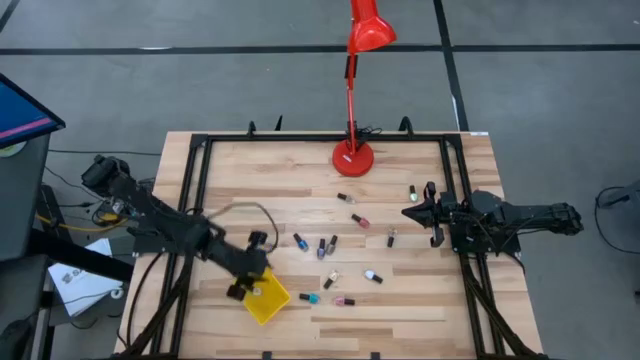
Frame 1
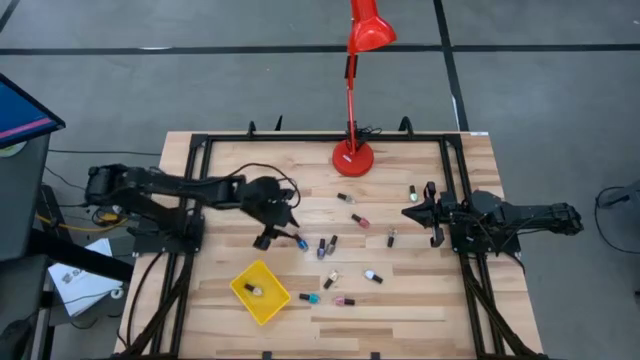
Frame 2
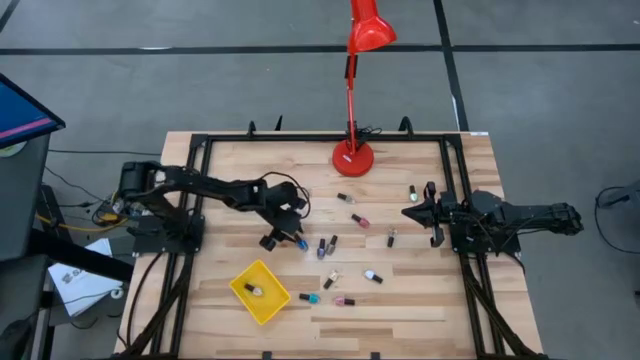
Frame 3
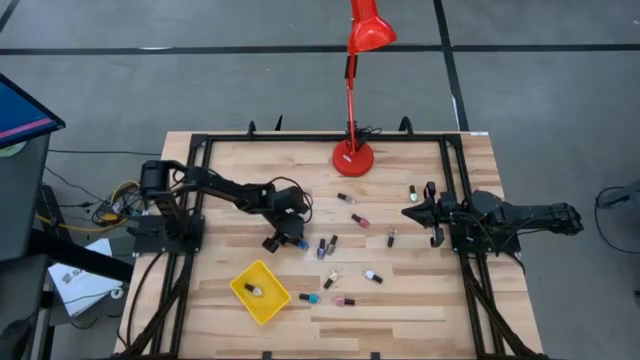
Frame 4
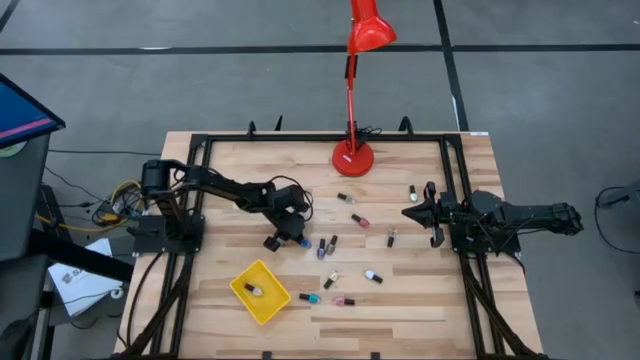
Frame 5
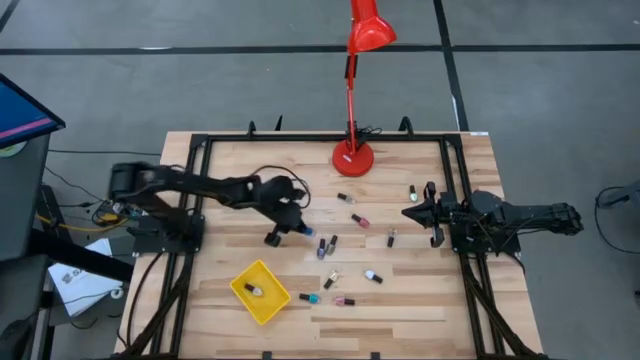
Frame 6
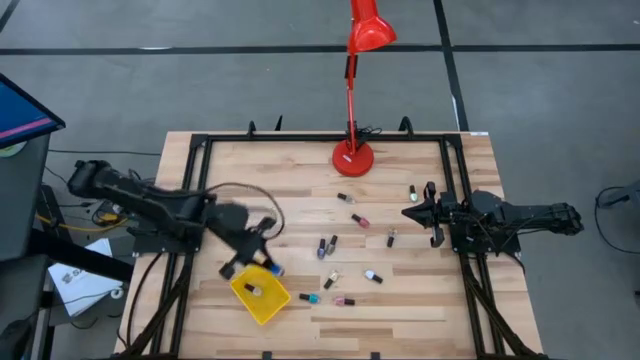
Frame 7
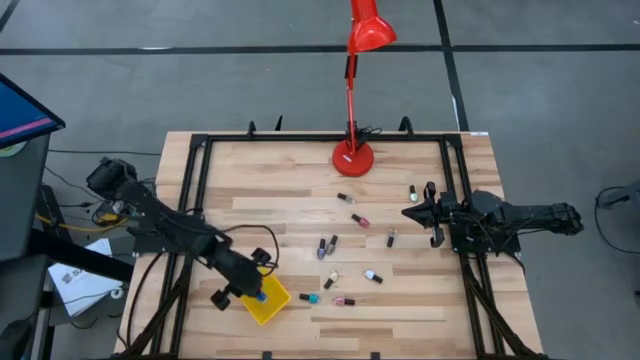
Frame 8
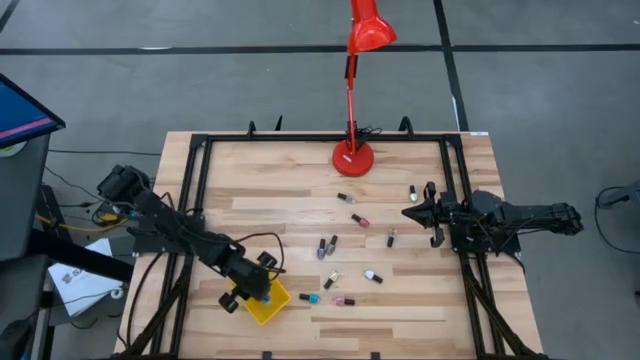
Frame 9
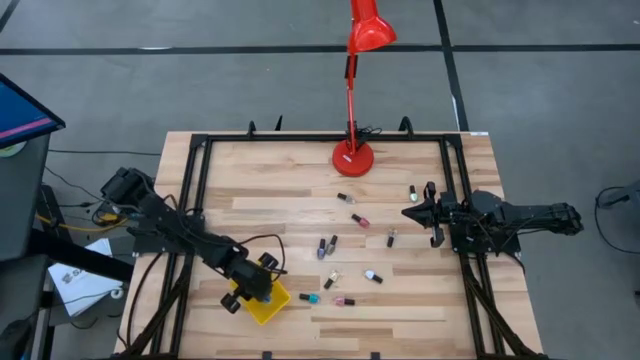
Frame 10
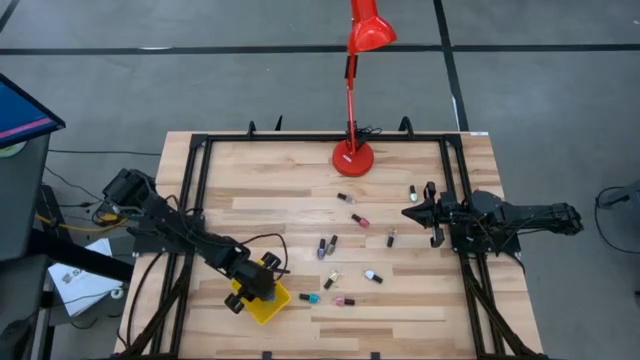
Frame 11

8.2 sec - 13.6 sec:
Task: Pick & Place Nail Polish
Put the blue nail polish bottle into the yellow basket

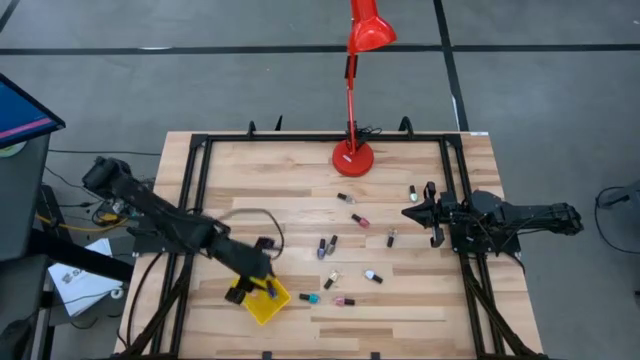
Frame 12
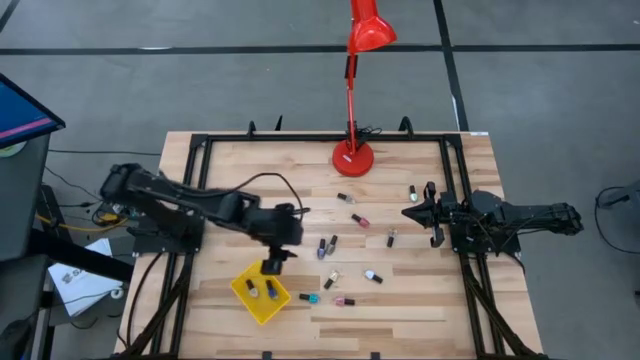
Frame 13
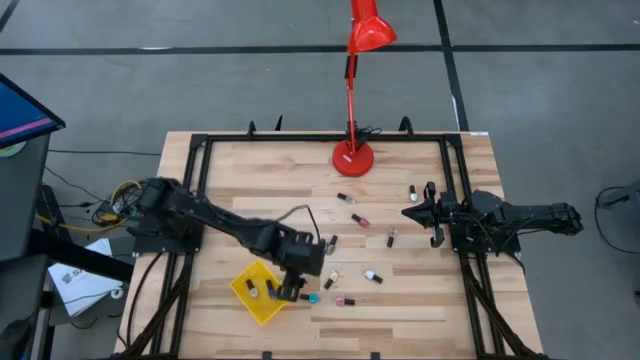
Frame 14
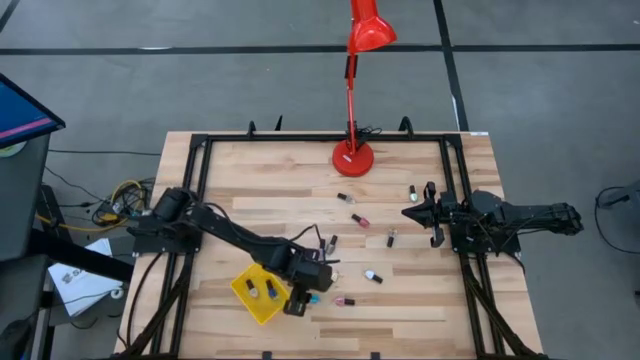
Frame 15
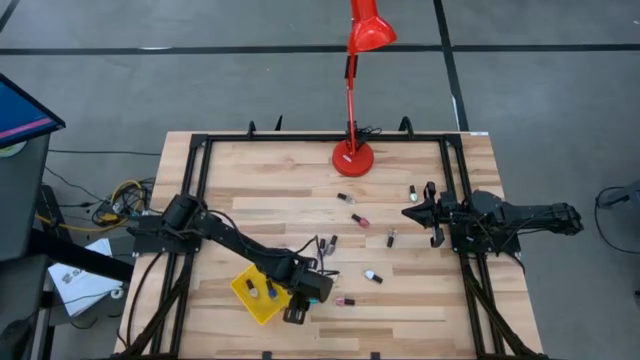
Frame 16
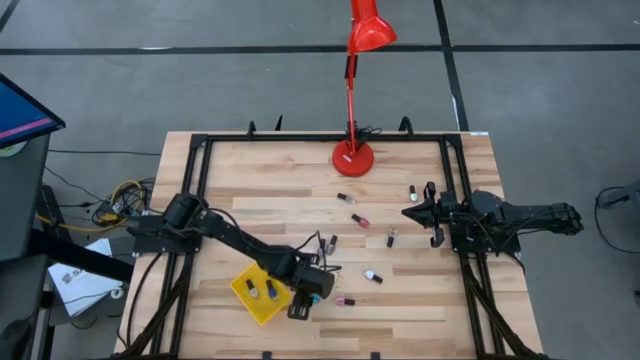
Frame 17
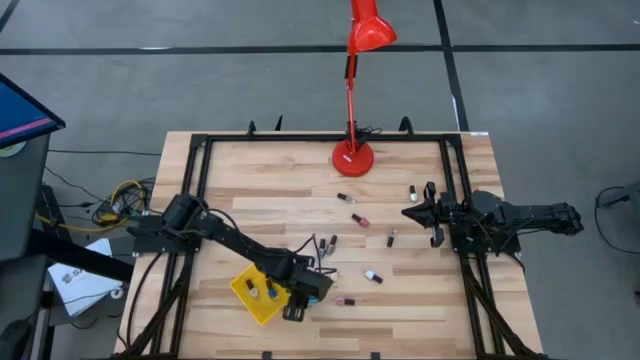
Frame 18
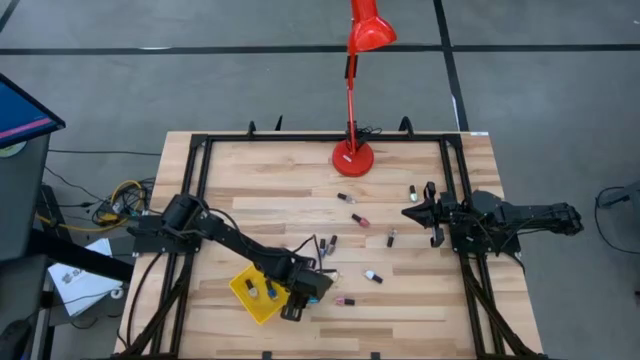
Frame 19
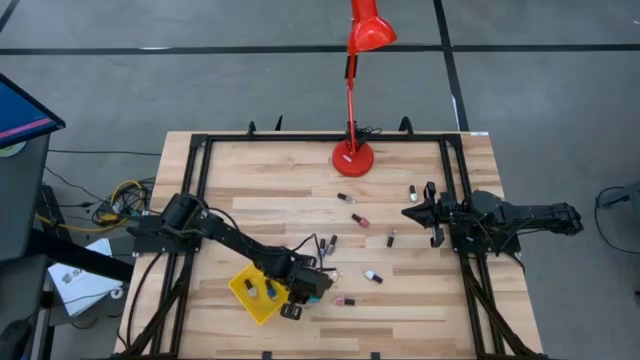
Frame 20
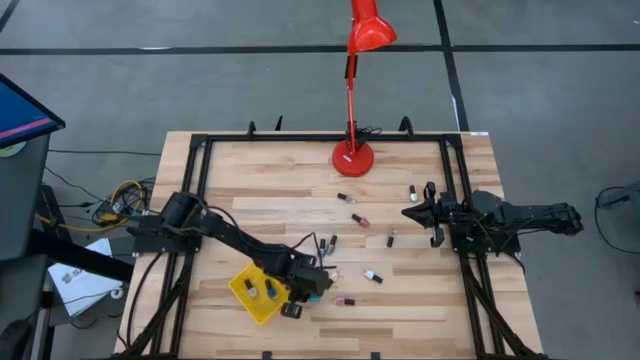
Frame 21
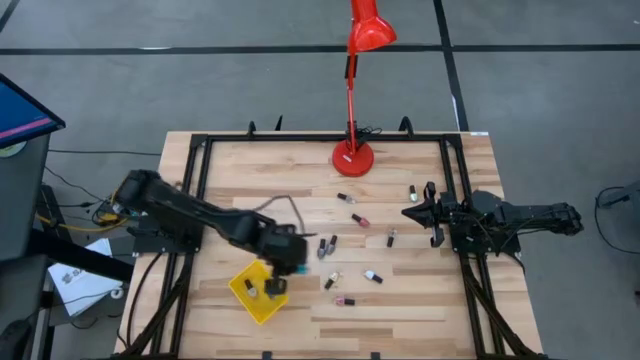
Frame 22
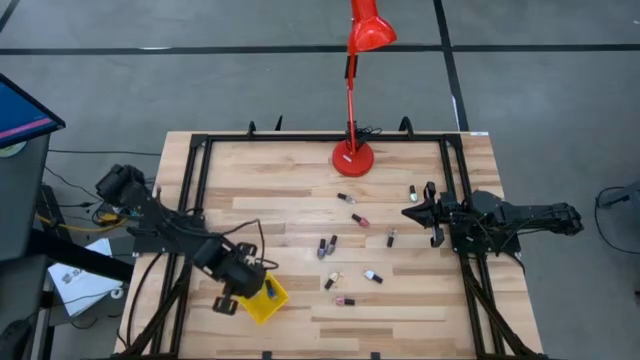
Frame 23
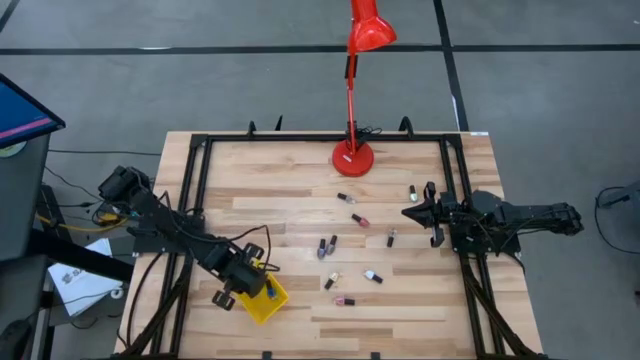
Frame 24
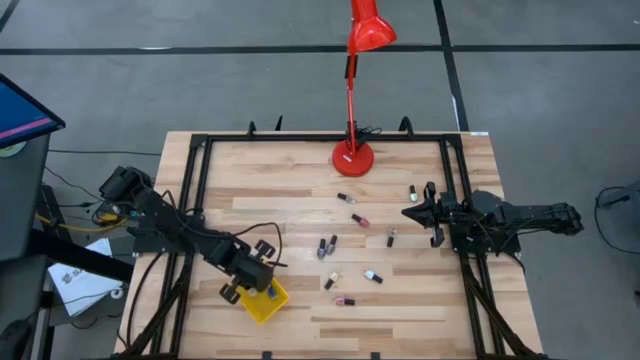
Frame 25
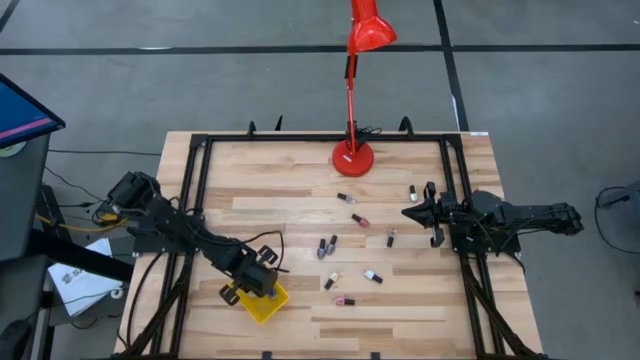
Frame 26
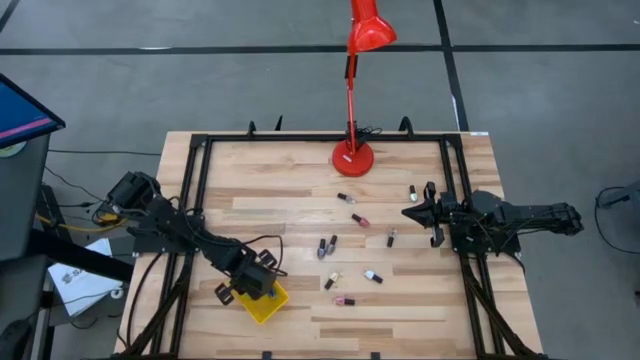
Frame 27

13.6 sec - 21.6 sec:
Put the light blue nail polish bottle into the yellow basket

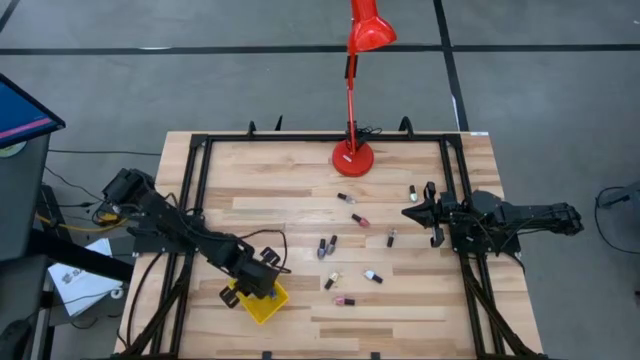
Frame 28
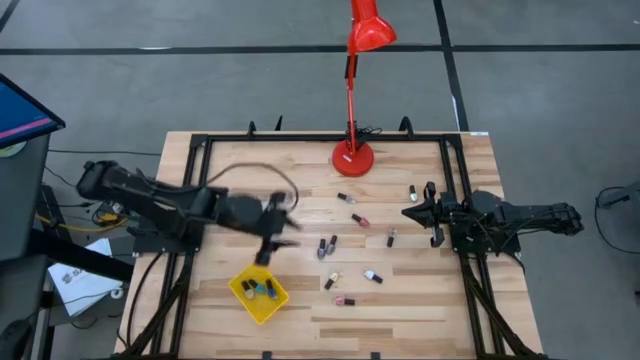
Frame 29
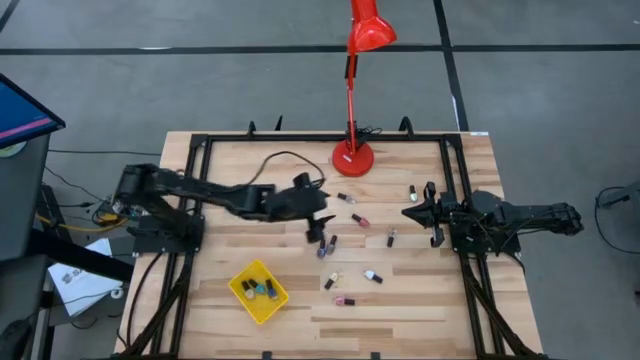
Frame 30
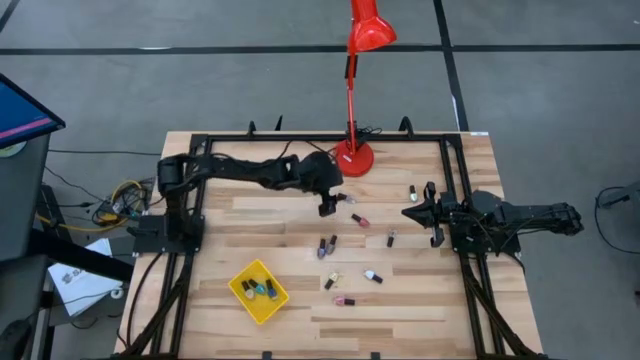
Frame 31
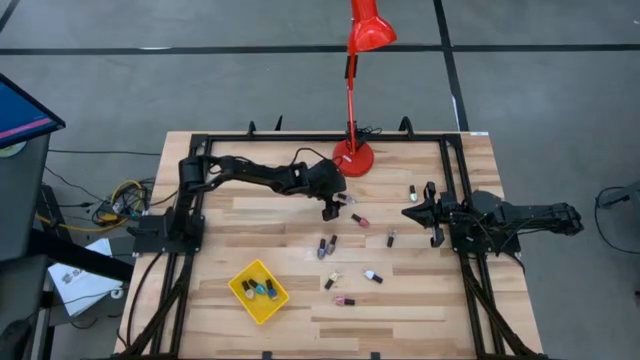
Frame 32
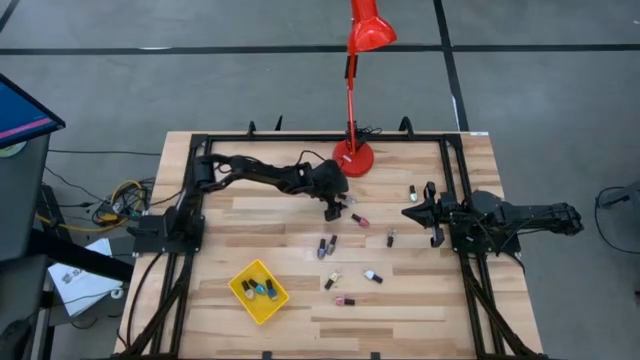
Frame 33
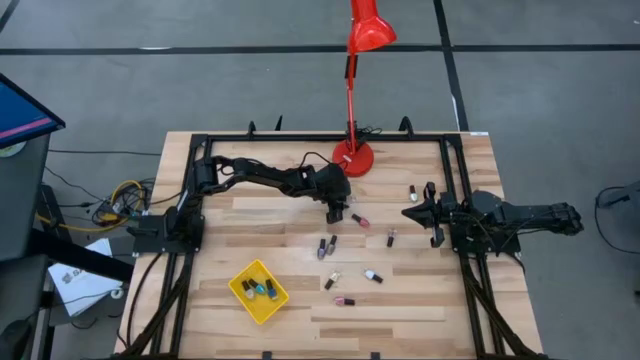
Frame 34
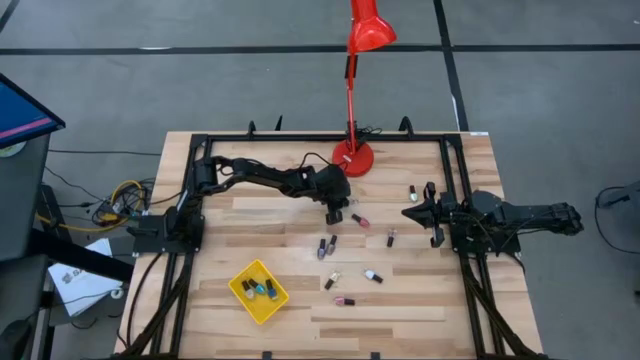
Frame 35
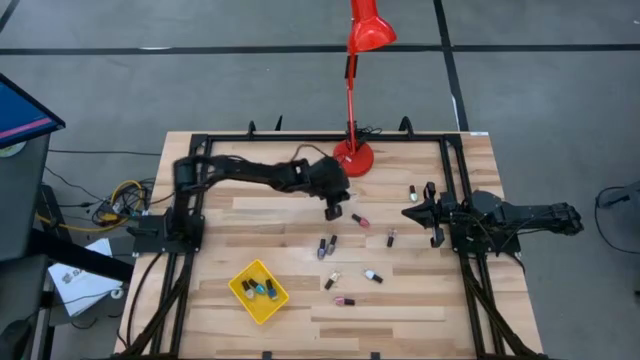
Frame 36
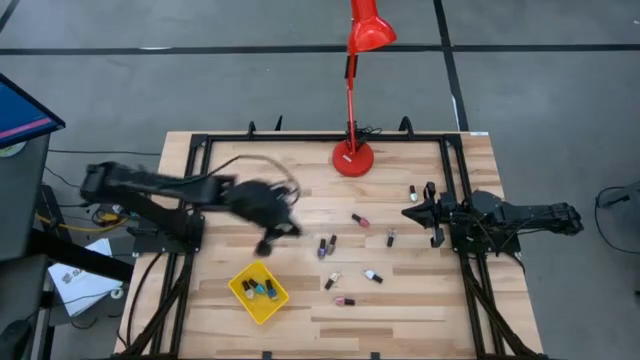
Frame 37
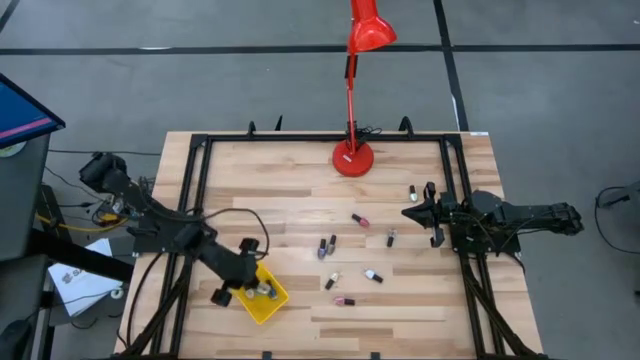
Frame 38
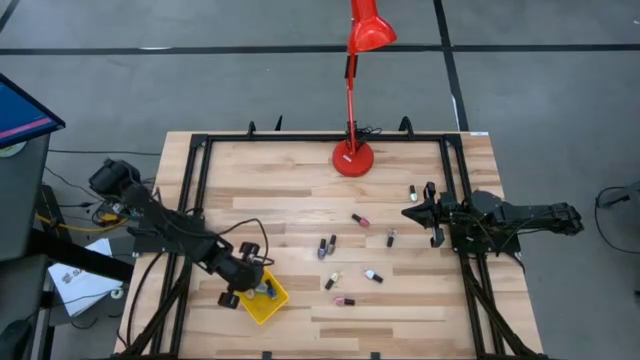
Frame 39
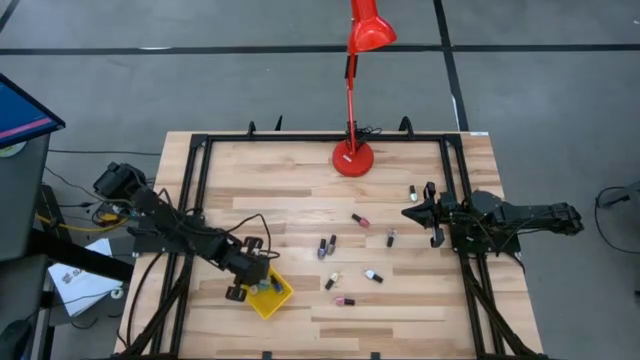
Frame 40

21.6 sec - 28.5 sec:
Put the transparent nail polish bottle into the yellow basket

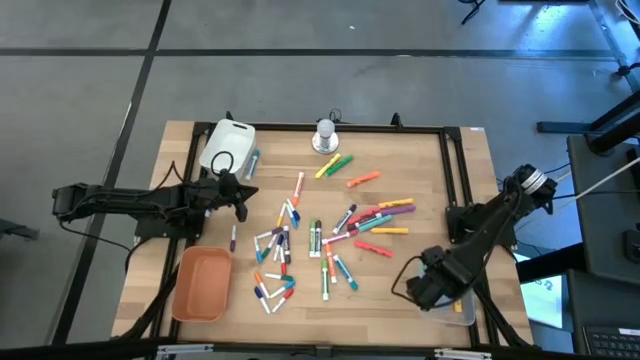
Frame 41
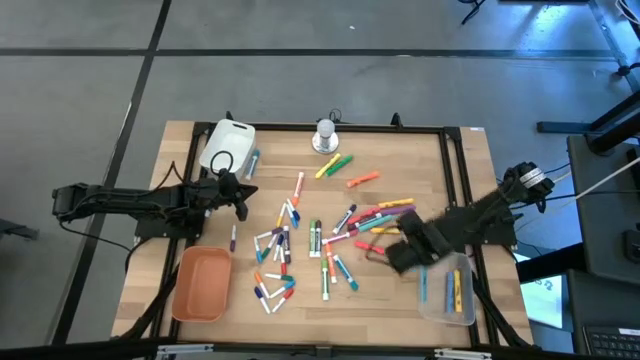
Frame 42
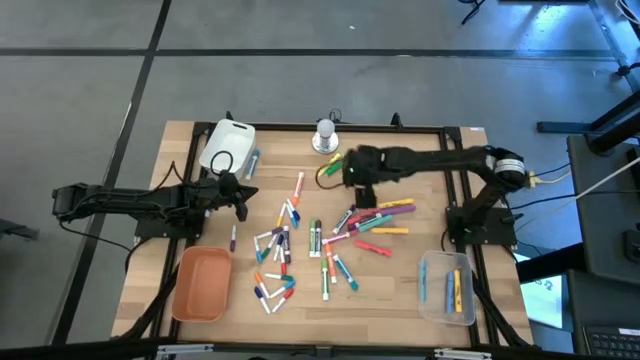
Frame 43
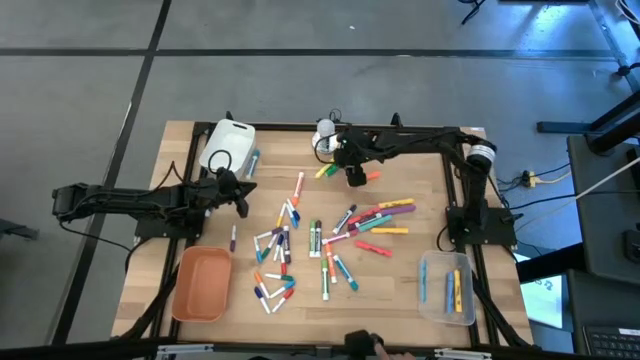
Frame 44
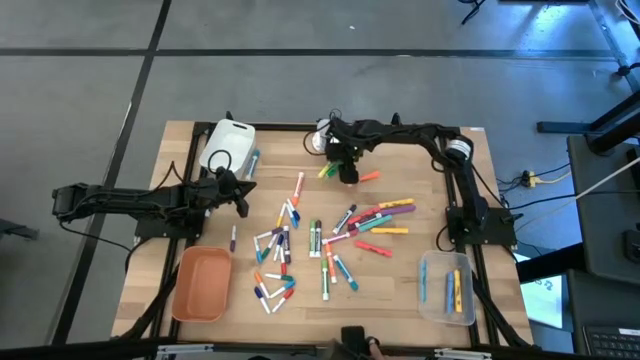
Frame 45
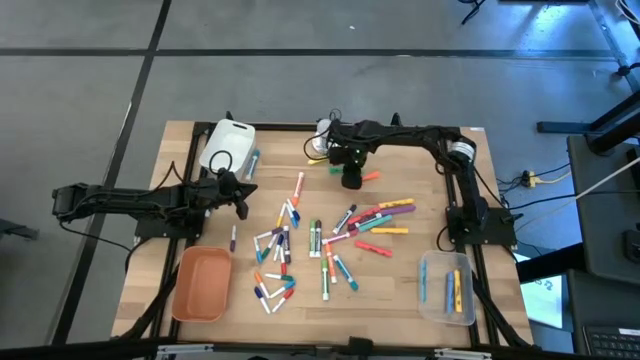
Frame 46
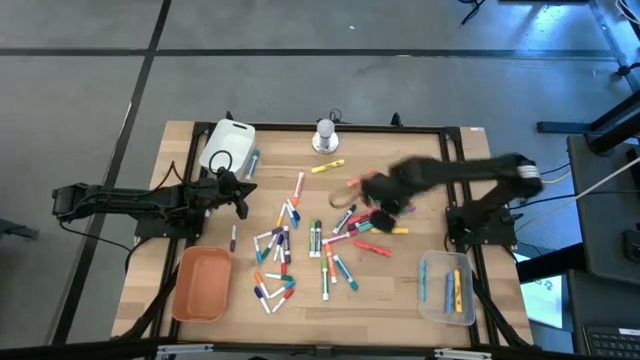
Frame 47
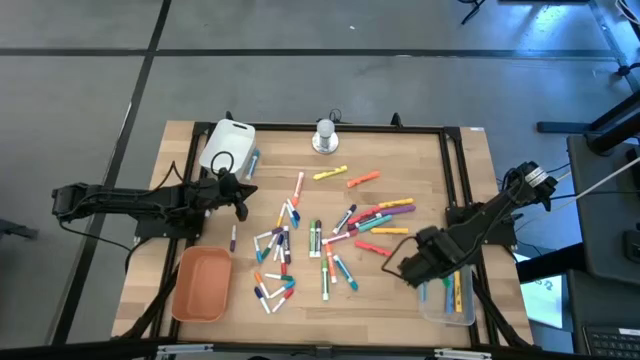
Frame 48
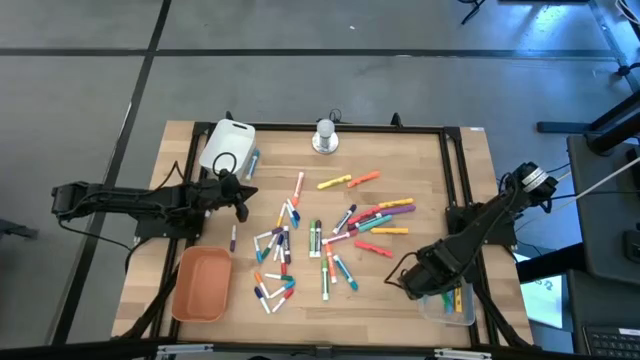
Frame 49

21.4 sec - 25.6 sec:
Task: Pick & Place Markers
Put the green highlighter pen into the transparent bin
